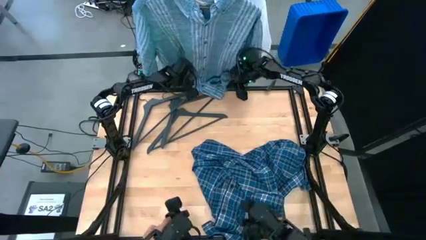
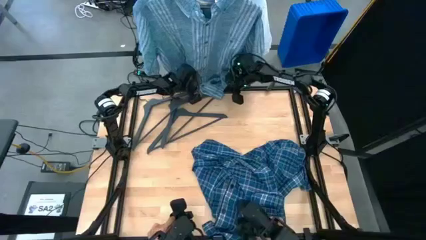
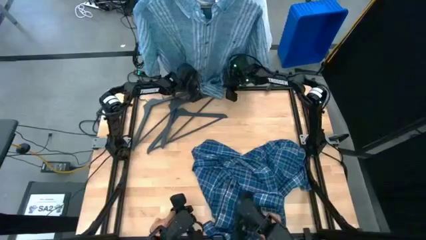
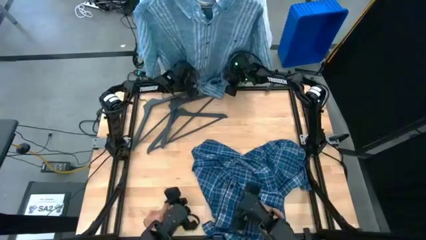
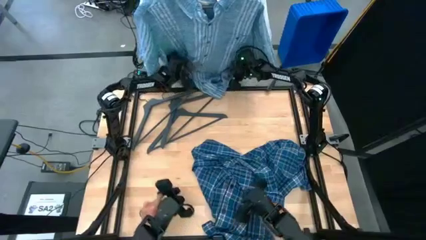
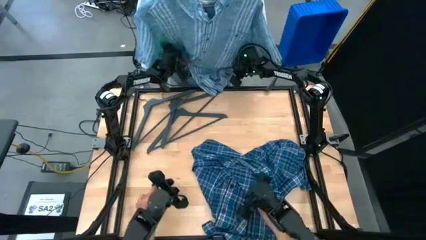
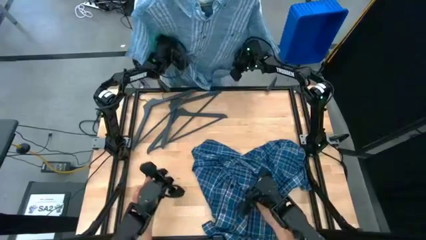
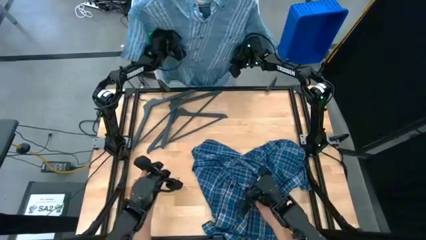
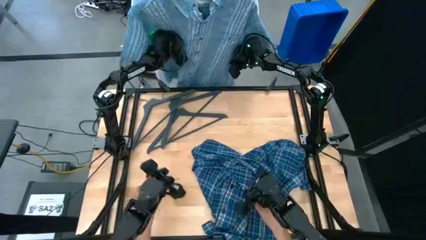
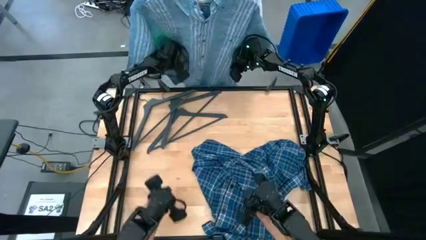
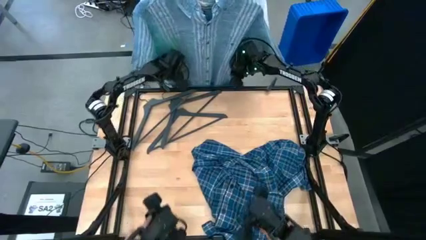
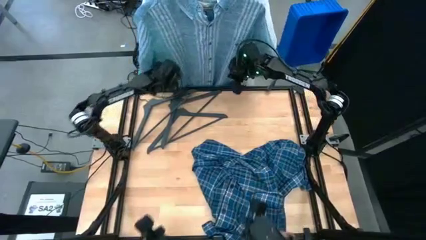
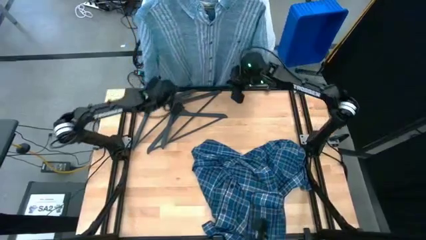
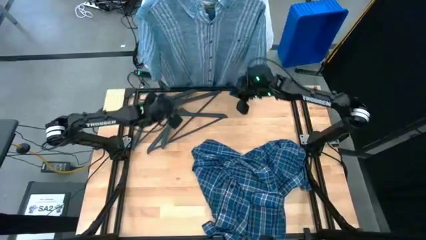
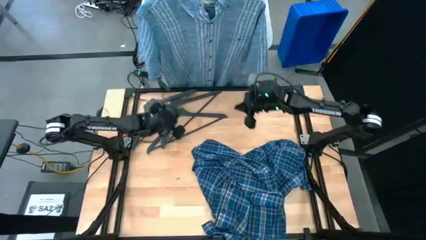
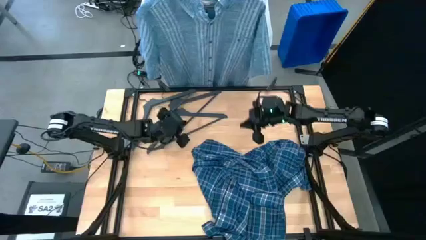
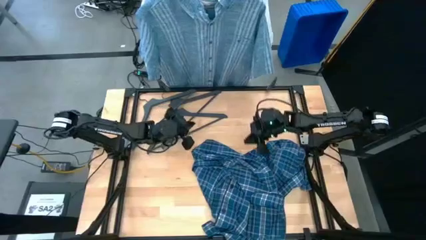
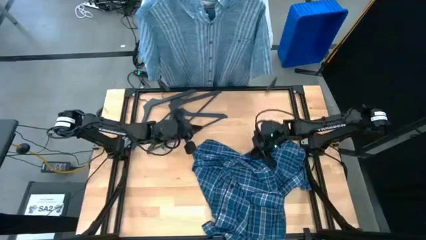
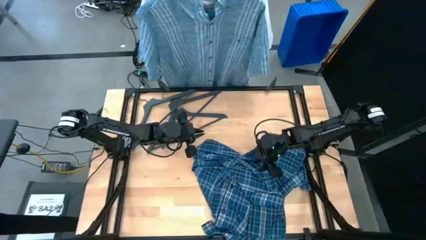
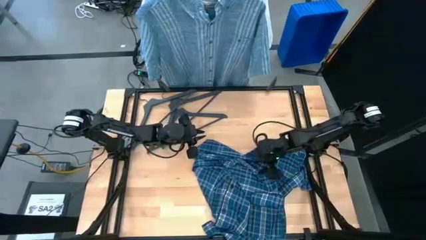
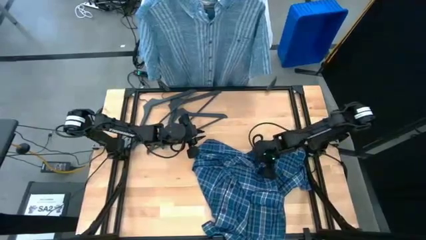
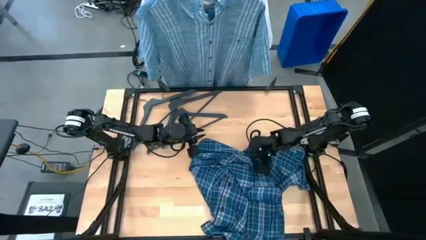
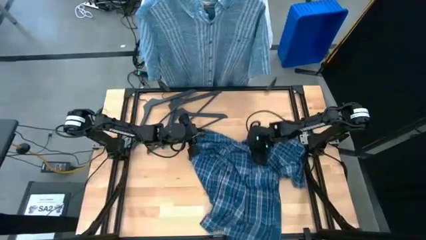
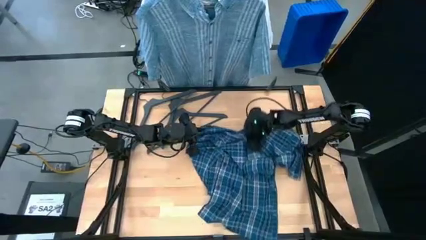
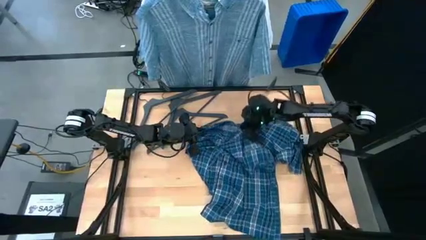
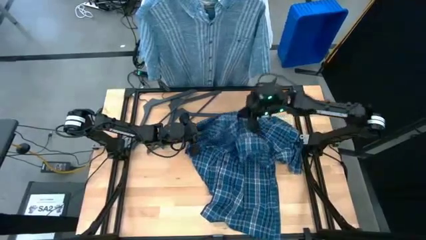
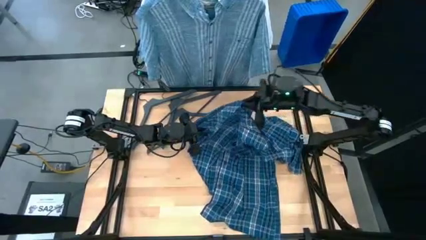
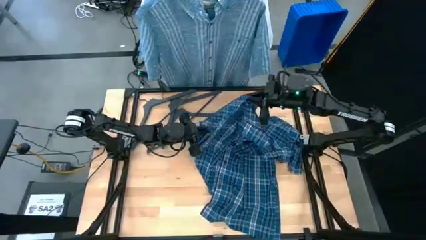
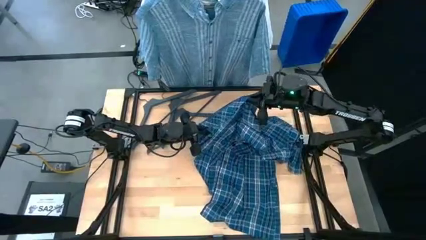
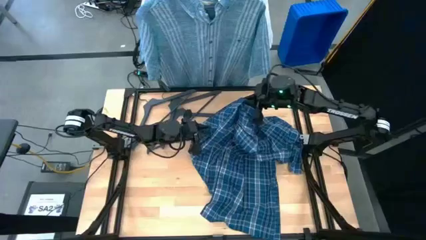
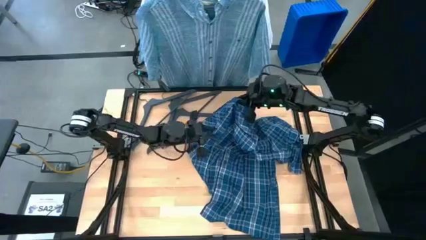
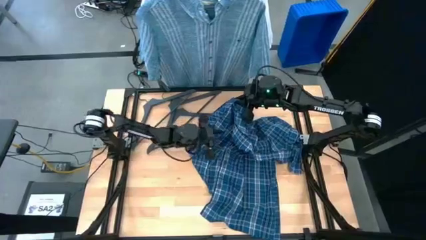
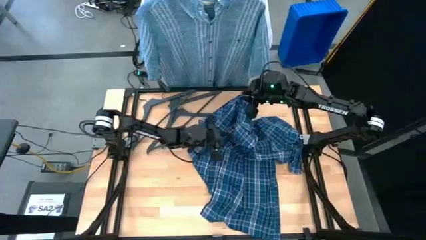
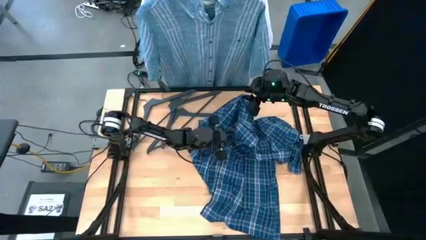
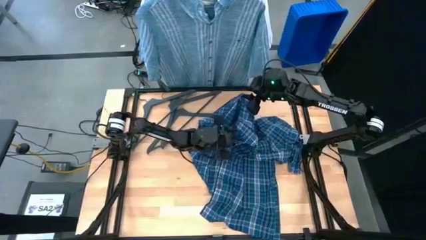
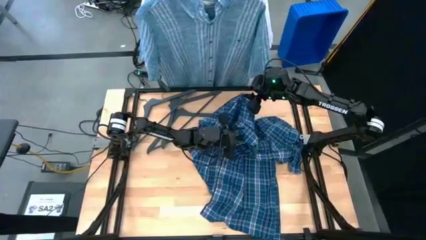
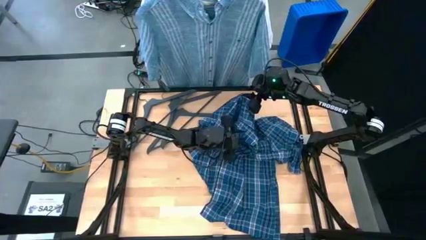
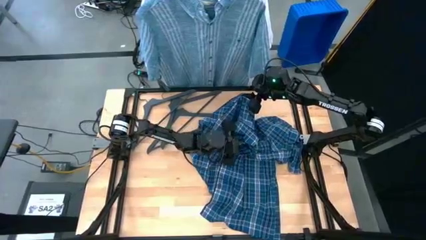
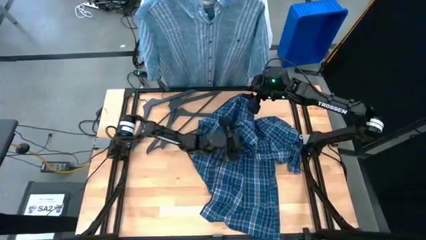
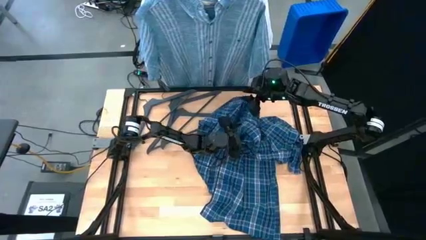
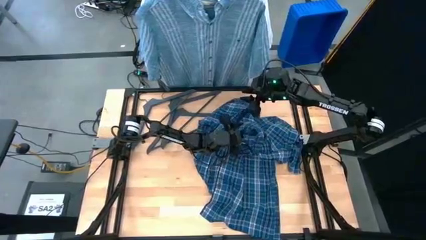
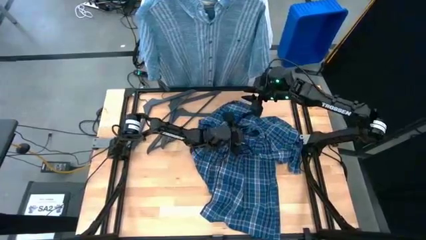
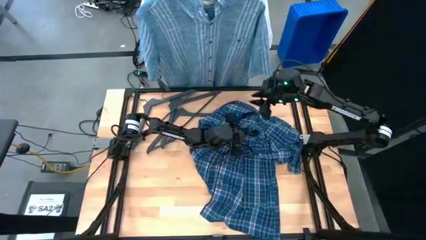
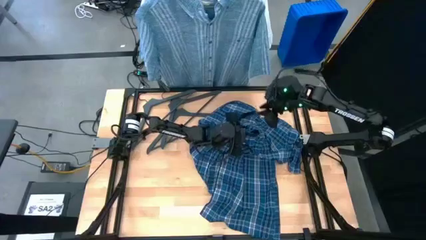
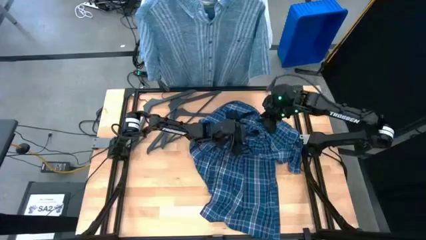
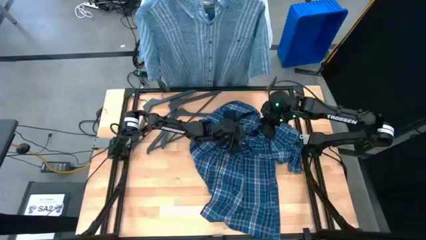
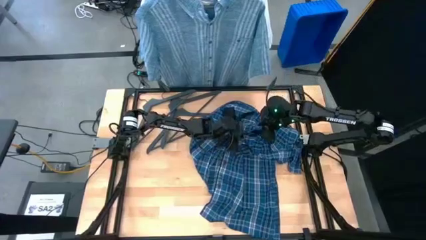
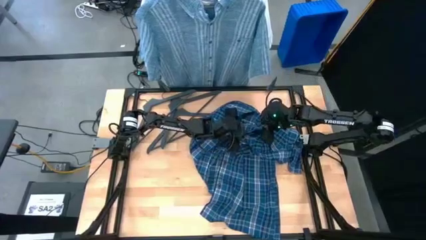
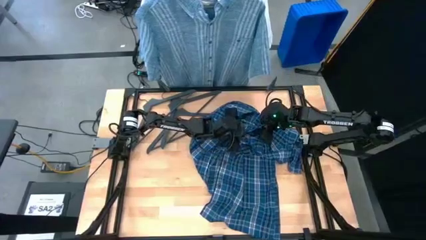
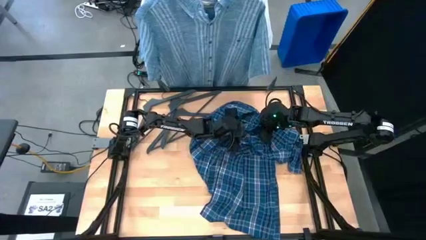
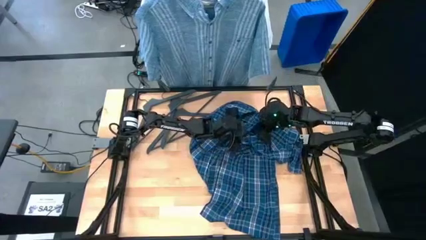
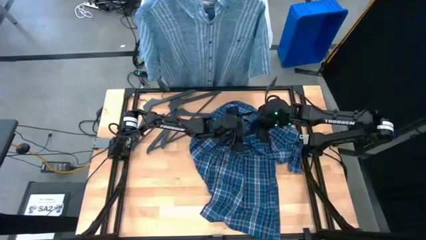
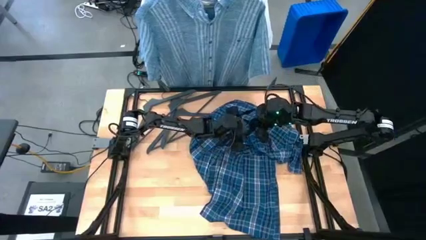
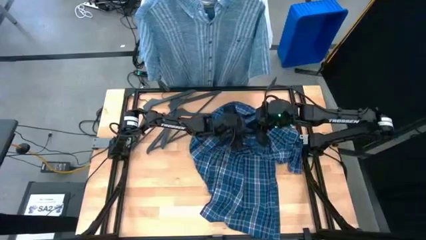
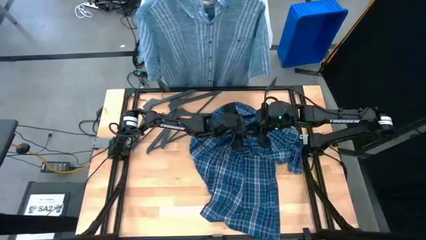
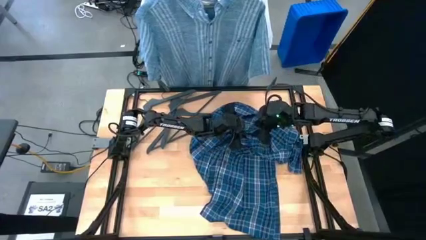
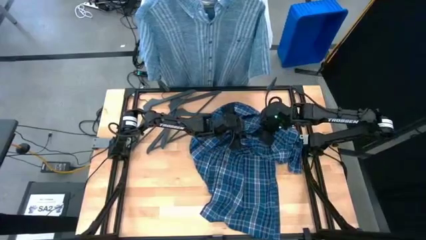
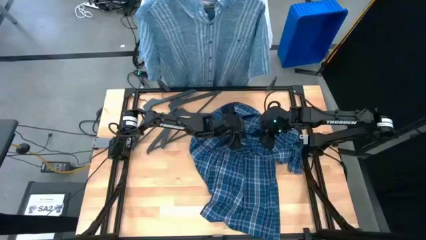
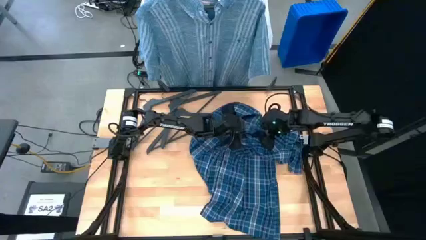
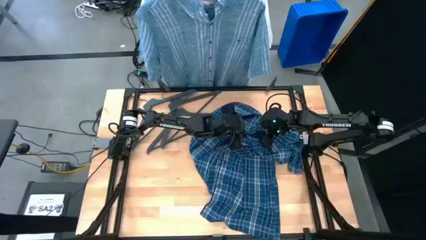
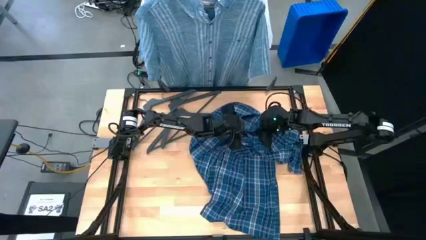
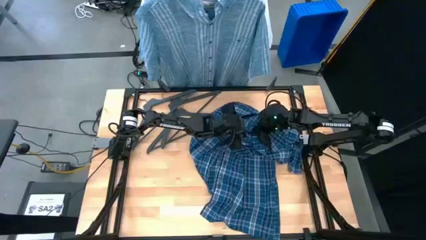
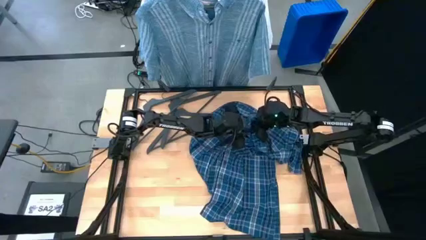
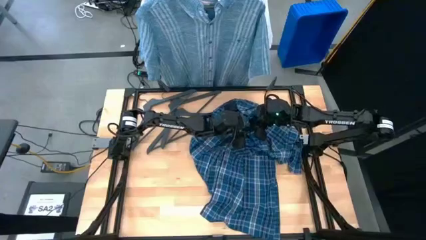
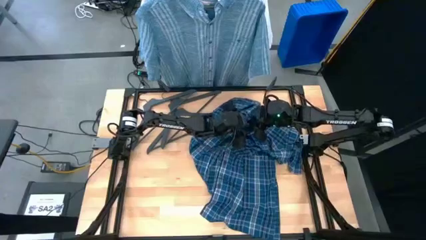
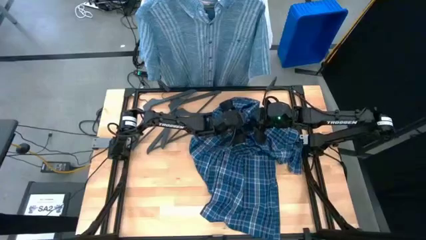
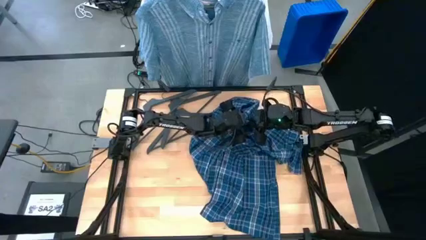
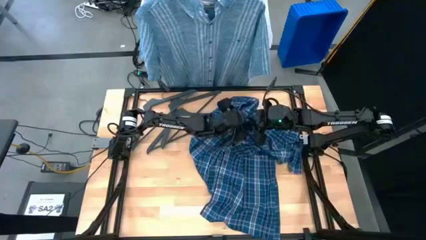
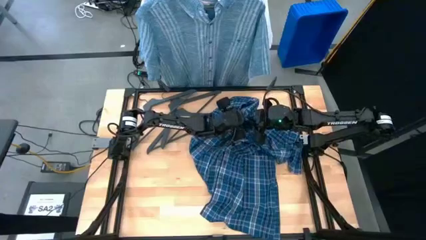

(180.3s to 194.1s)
Task: Hang clothes
Insert the black hanger into the blue shirt

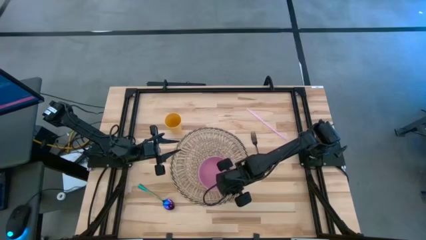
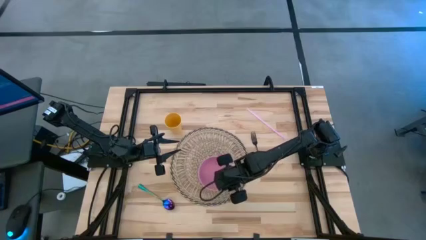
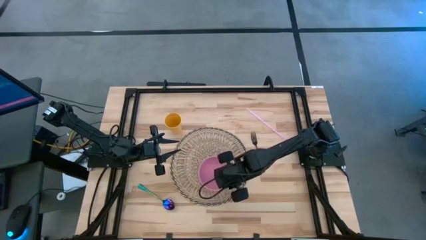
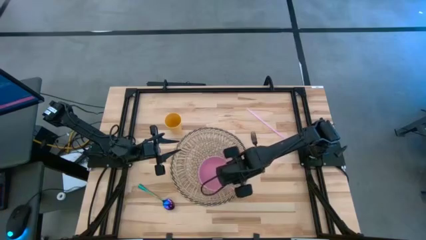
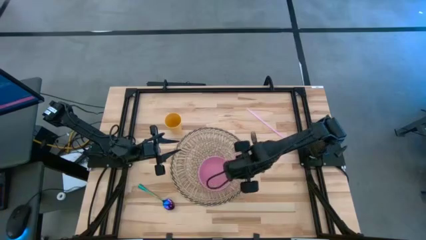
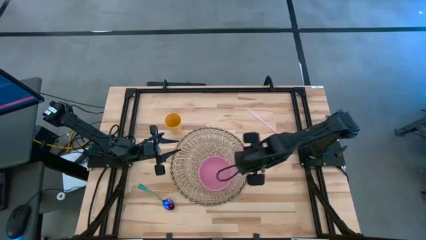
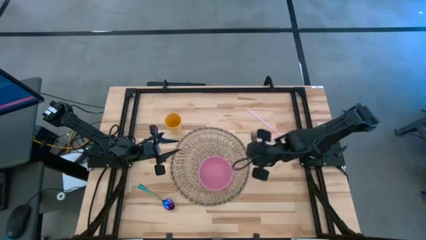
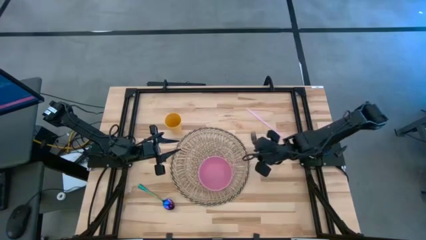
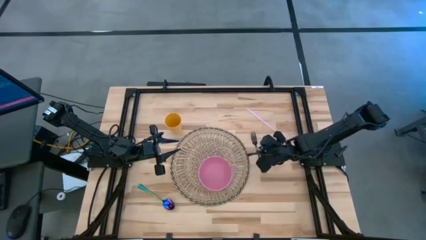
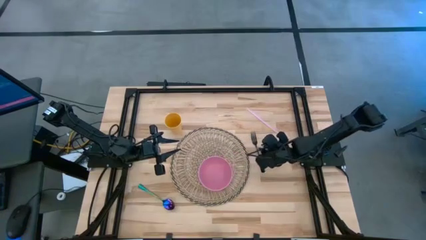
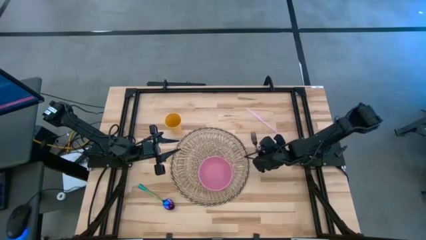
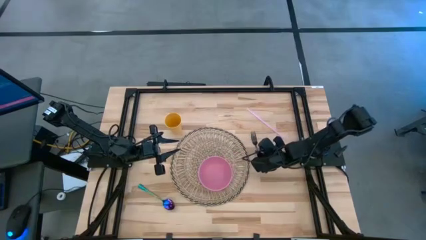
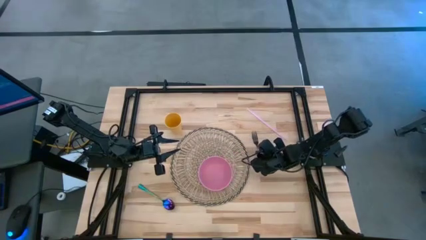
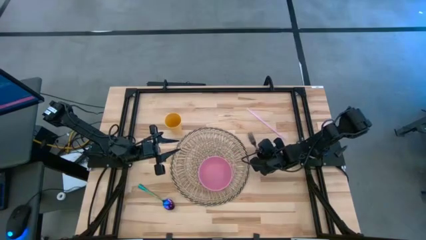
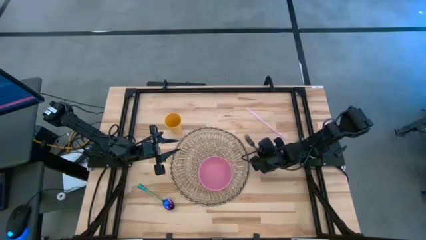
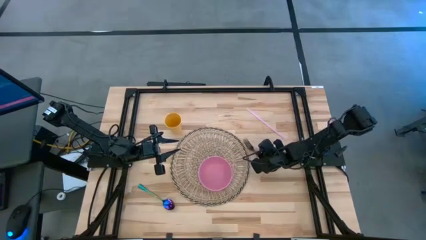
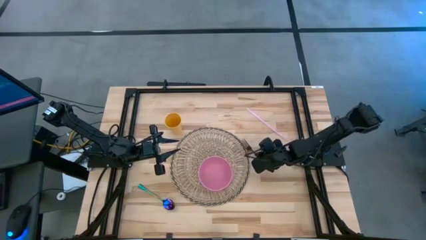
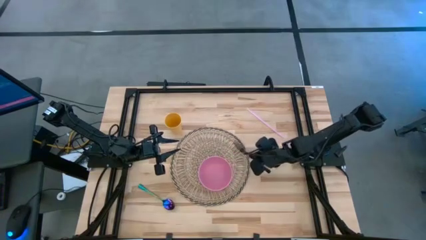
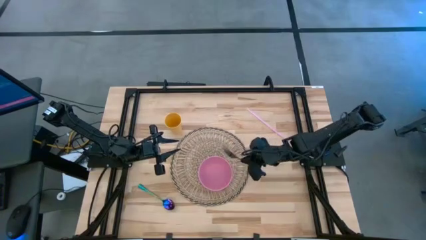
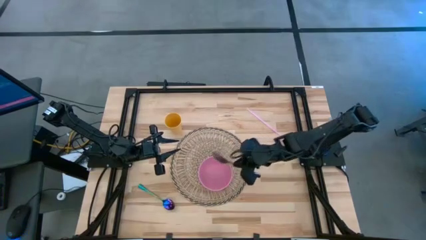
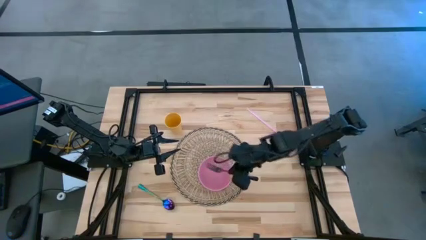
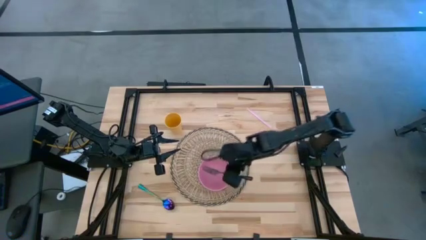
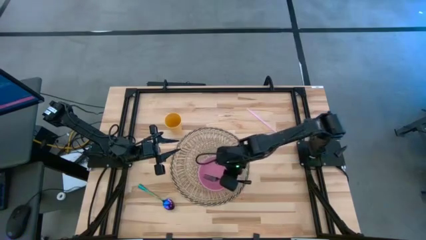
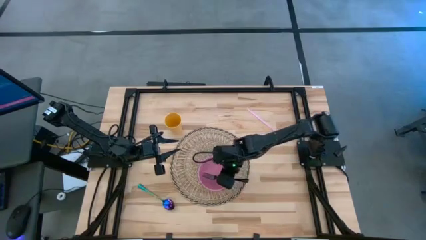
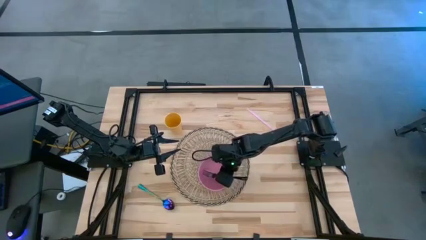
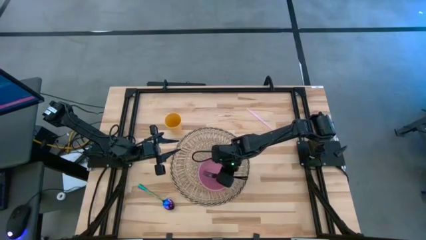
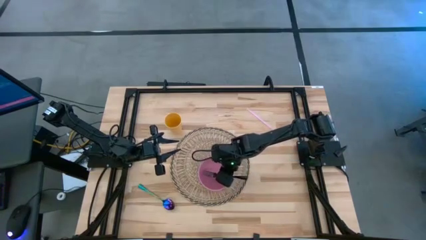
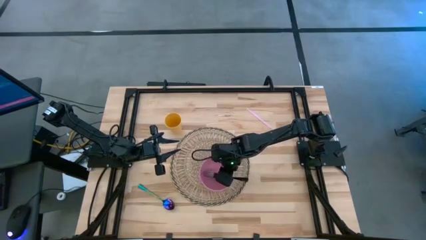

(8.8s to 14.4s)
Task: Pick & Place Utensil
Put the black fork into the pink bowl on the brown mat
